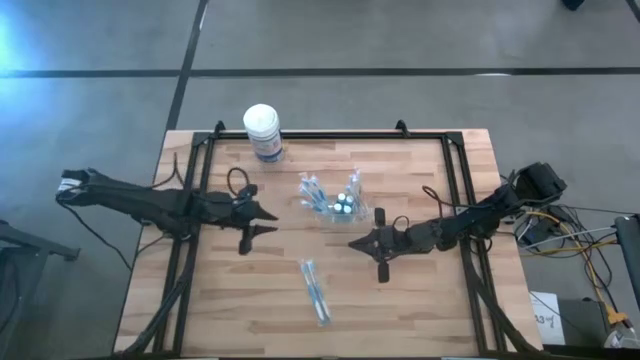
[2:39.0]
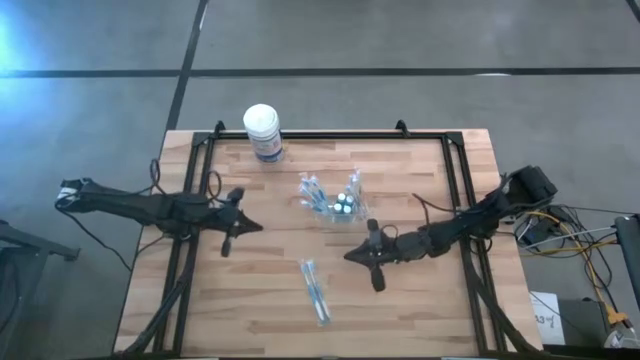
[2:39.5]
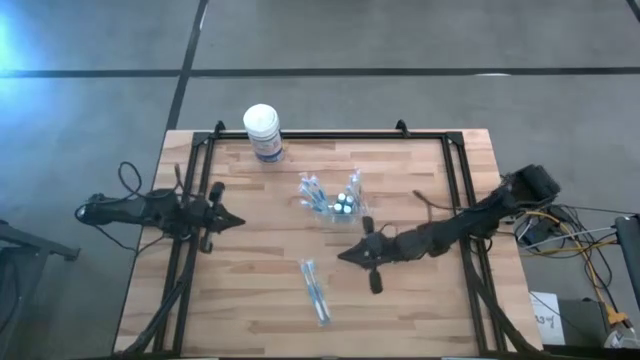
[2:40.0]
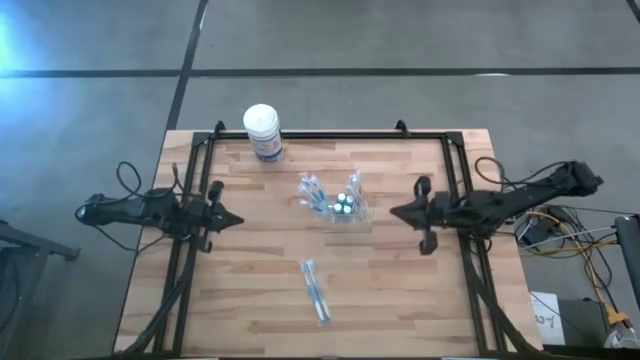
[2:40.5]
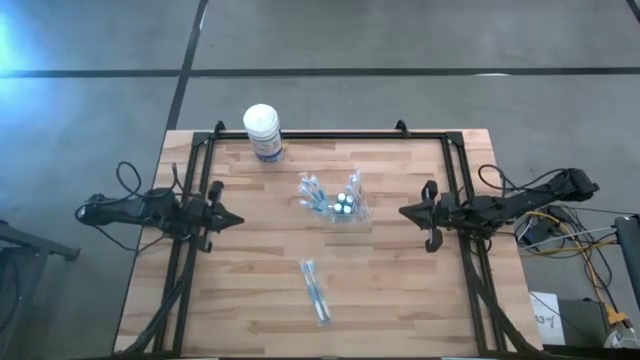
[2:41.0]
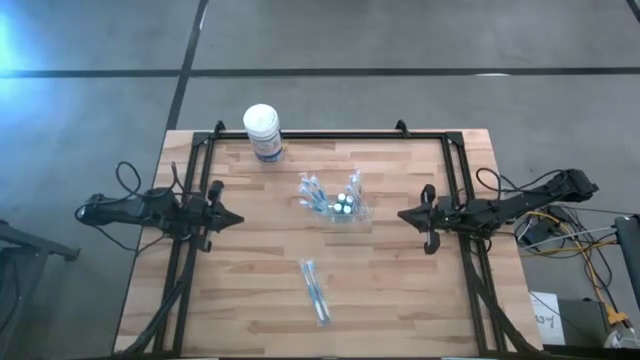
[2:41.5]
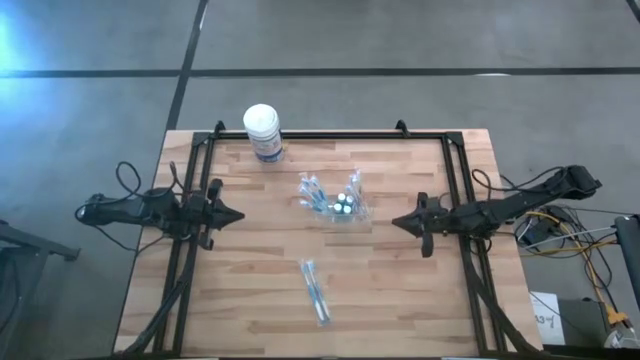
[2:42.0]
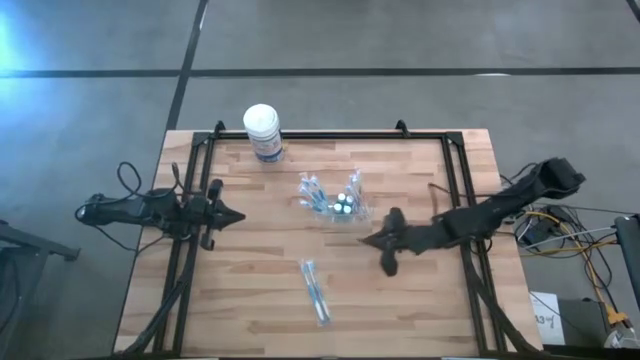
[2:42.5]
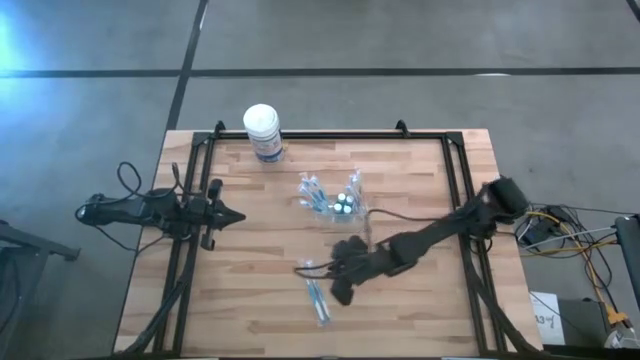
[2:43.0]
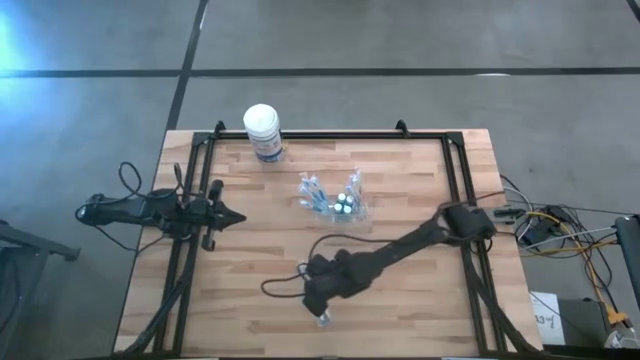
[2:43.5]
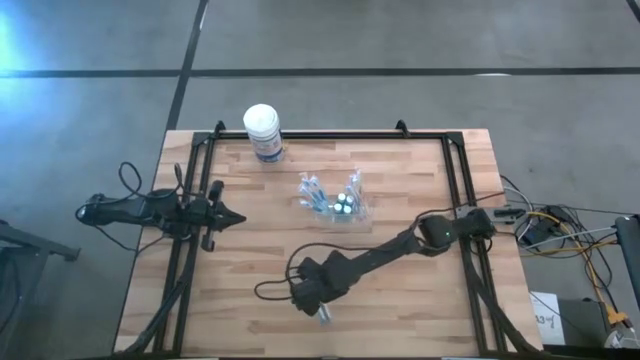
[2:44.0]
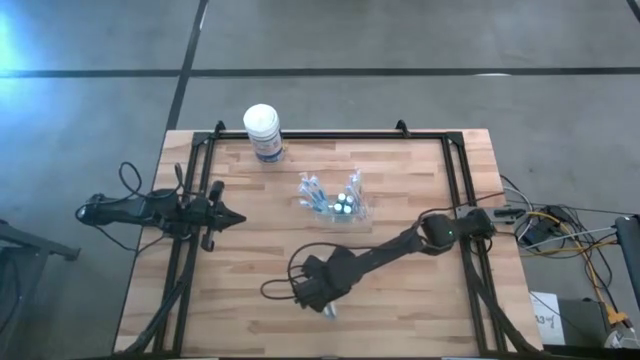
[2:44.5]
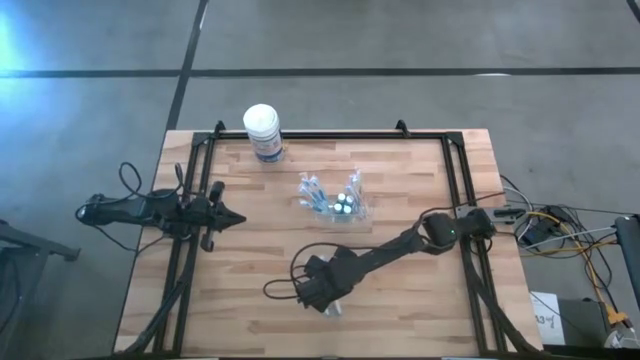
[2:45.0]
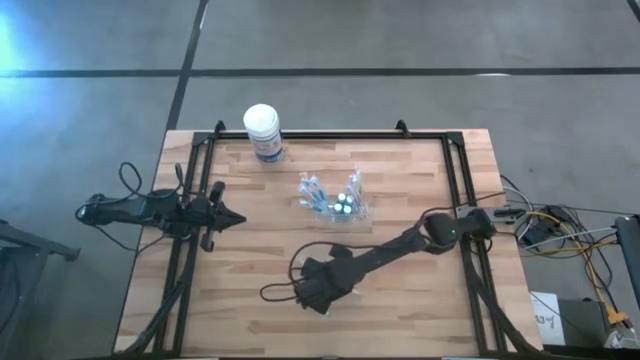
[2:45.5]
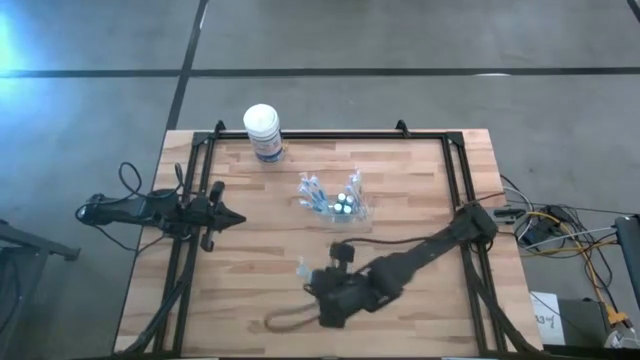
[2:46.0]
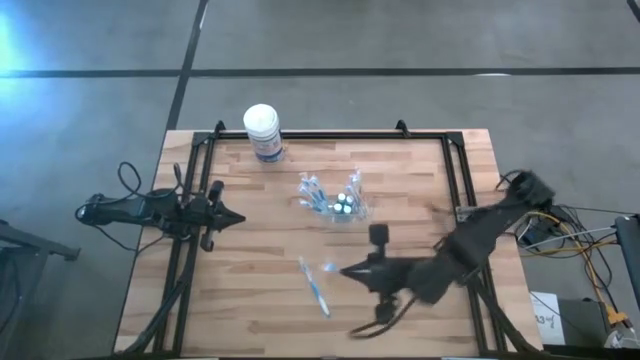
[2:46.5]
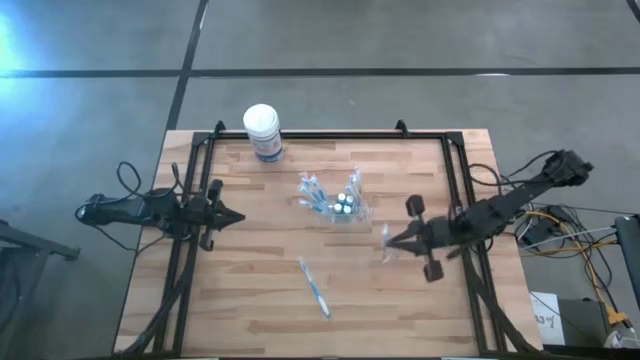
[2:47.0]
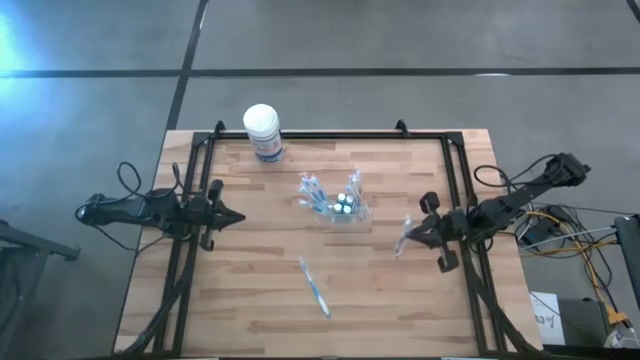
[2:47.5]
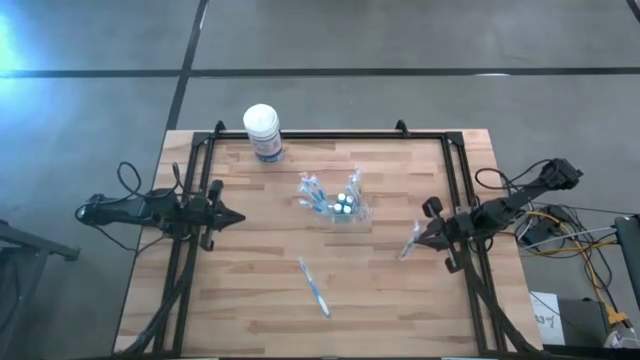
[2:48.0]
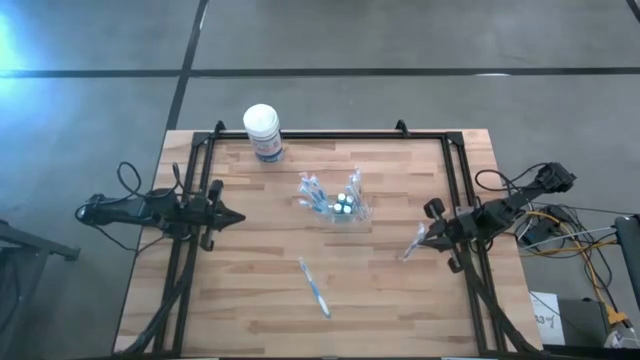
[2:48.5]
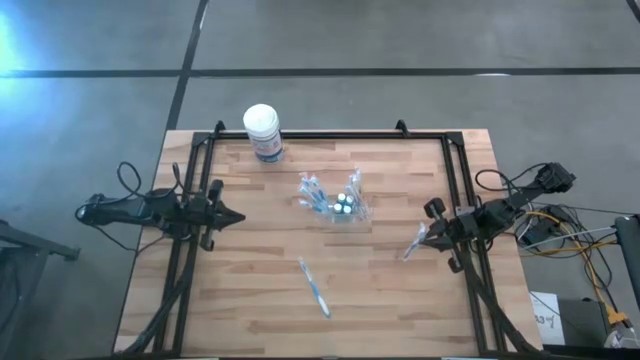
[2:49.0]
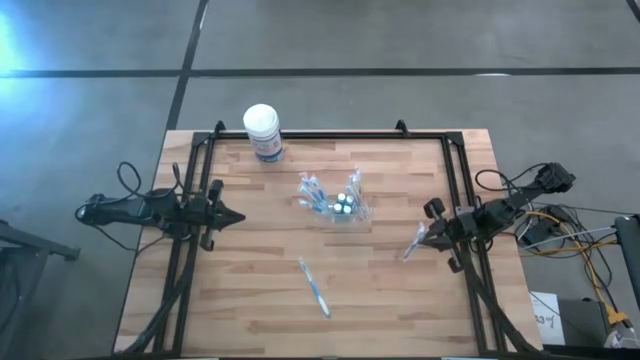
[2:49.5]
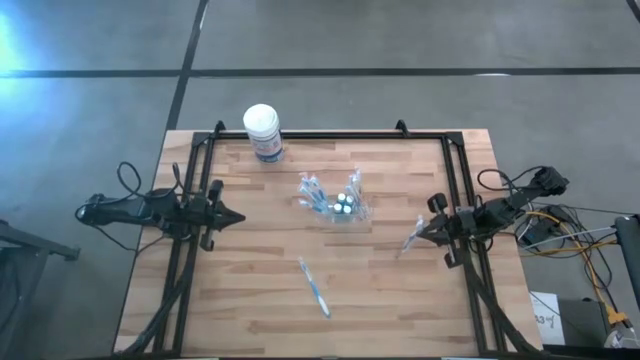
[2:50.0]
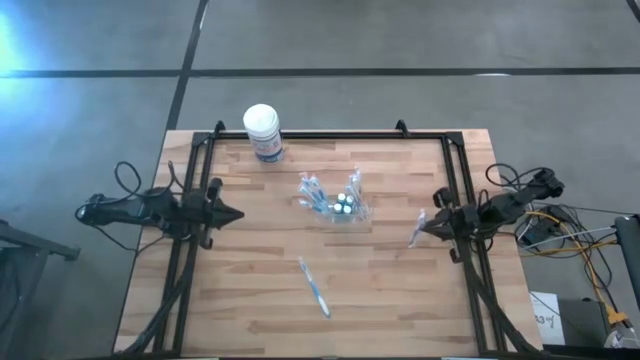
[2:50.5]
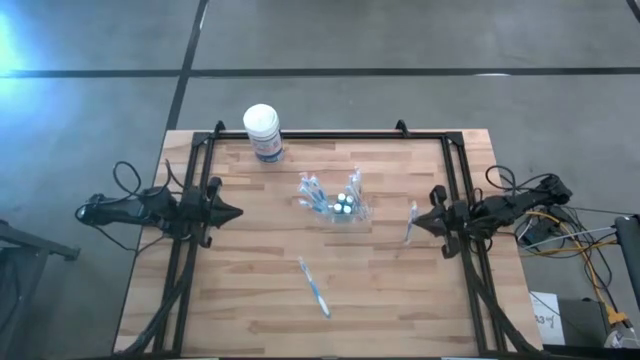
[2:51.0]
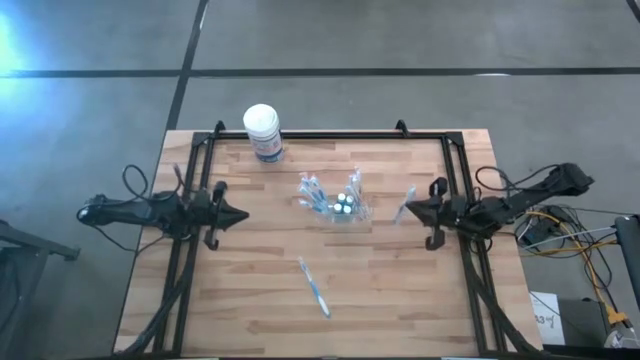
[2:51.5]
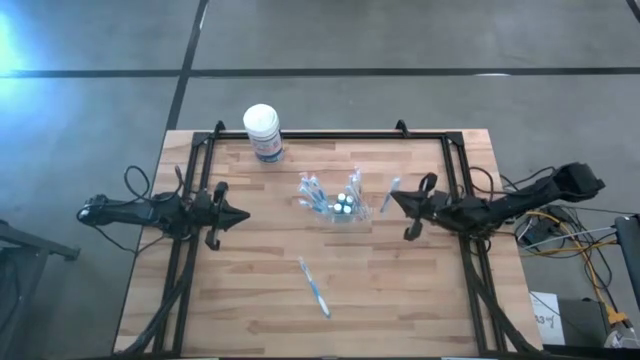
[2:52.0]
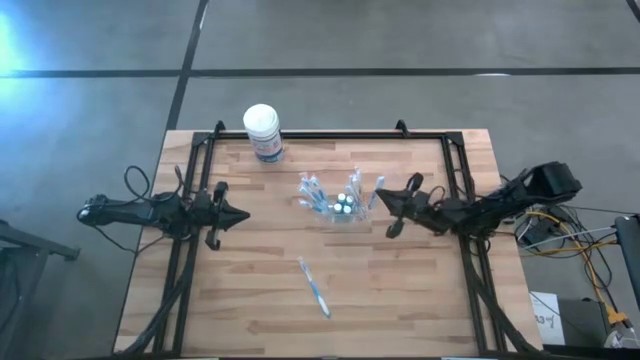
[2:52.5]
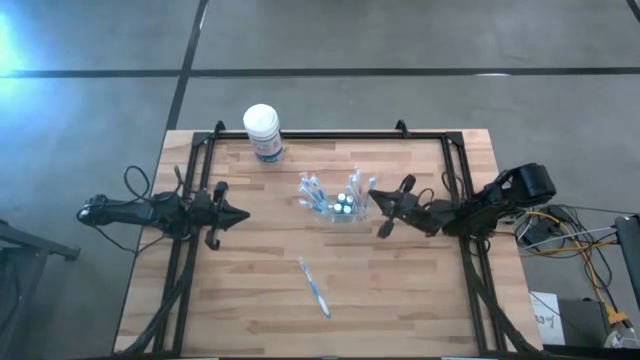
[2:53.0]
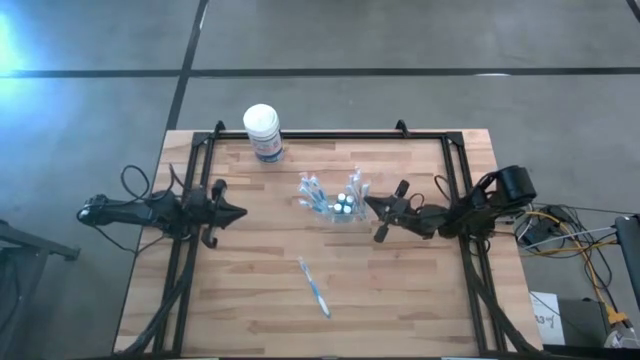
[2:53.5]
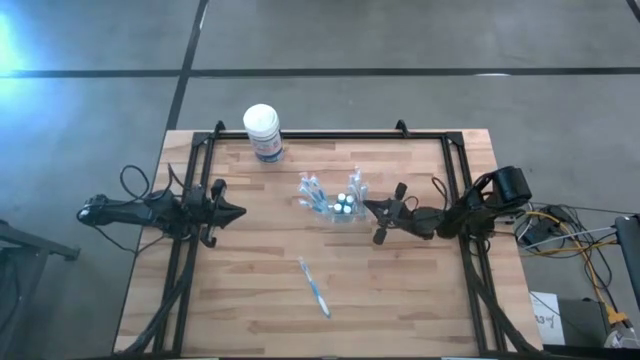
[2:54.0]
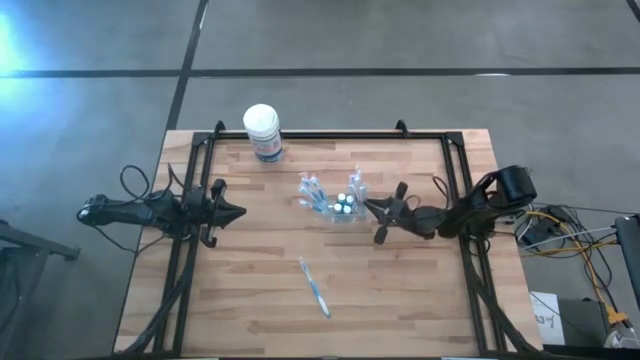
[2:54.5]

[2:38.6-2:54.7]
Task: Pick & Place toothbrushing station
Put the blue toothbrush into the transparent organizer

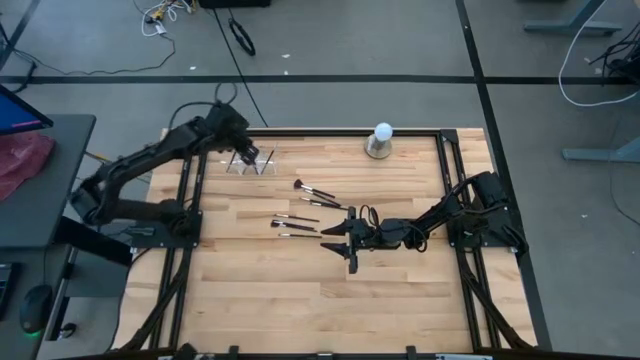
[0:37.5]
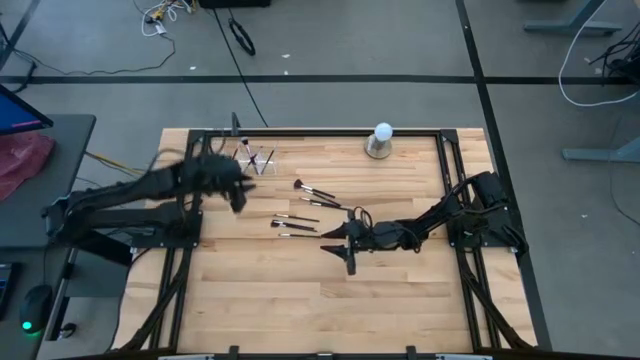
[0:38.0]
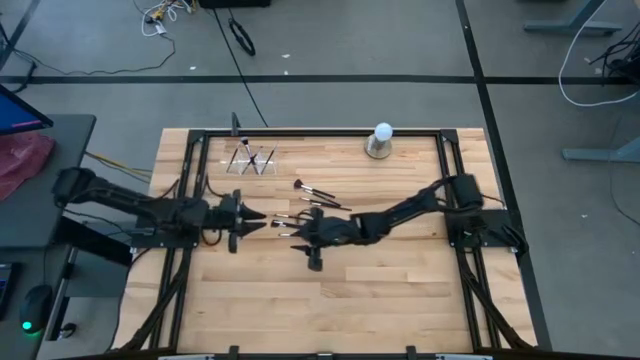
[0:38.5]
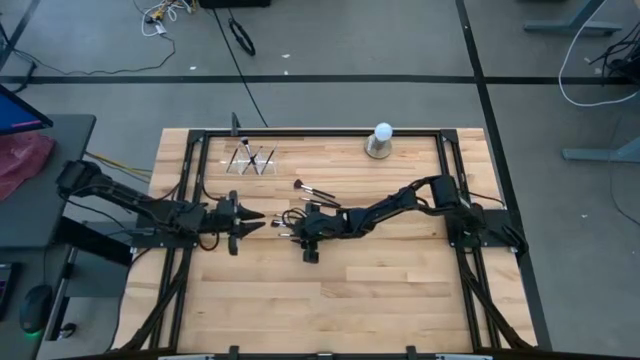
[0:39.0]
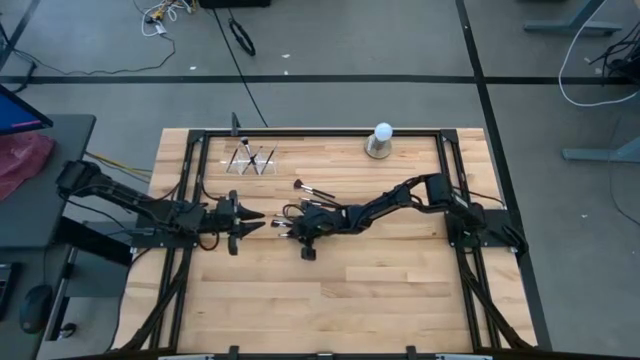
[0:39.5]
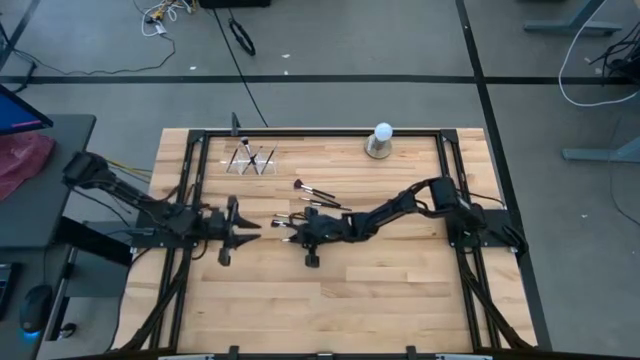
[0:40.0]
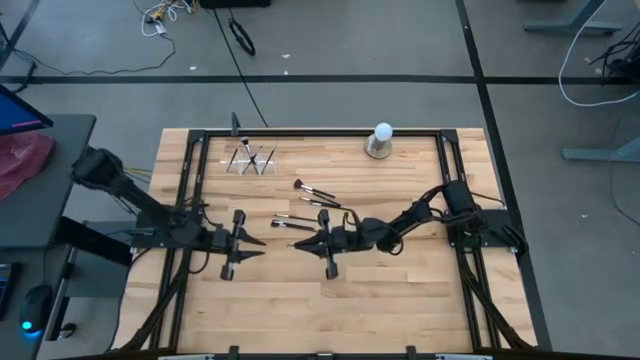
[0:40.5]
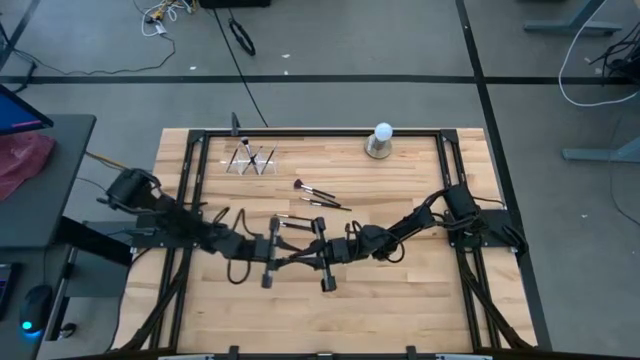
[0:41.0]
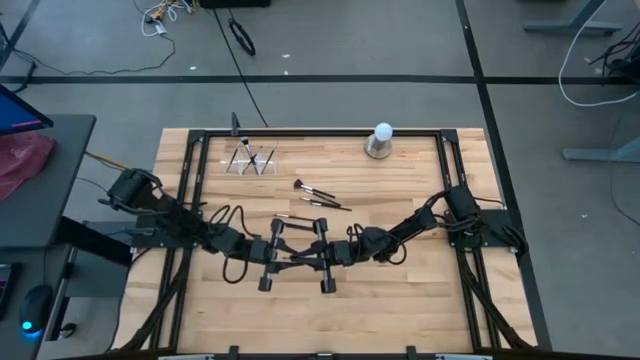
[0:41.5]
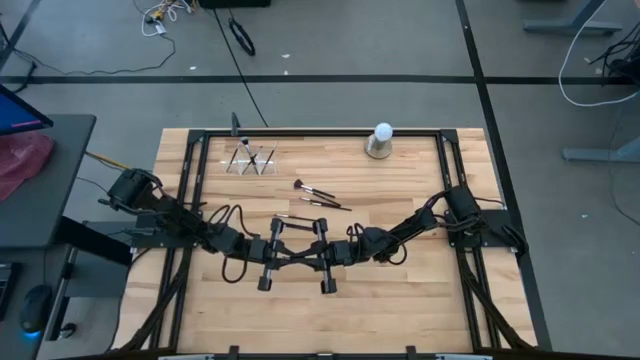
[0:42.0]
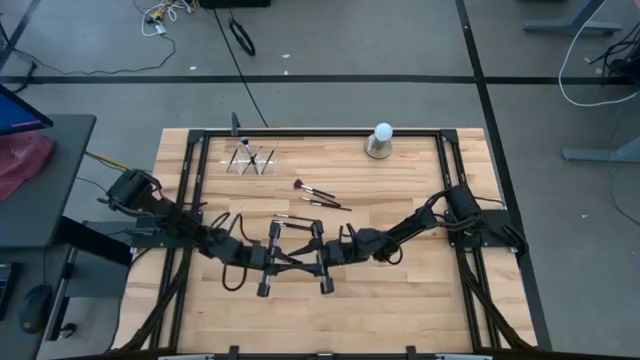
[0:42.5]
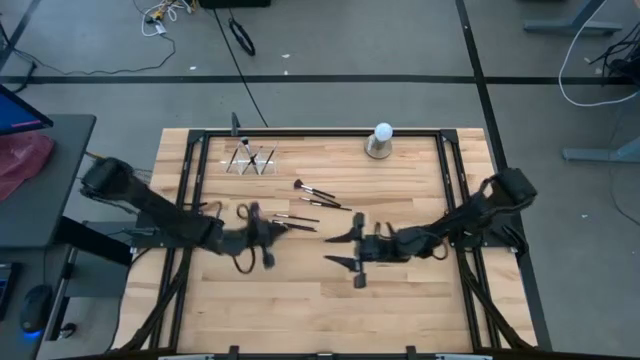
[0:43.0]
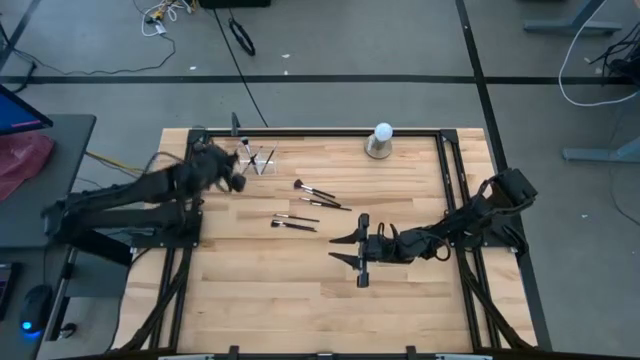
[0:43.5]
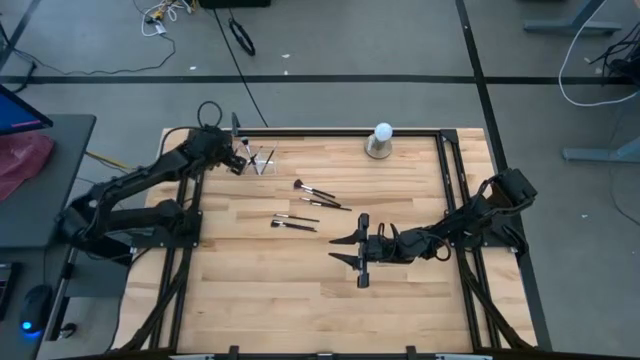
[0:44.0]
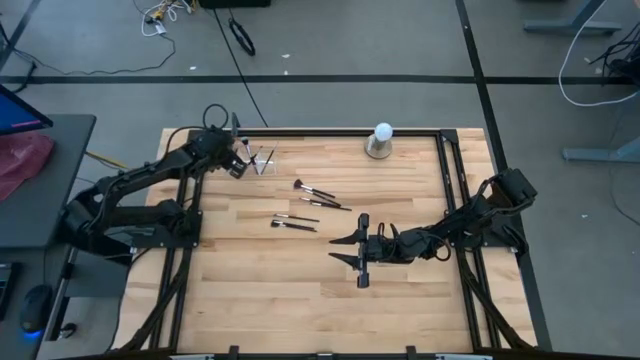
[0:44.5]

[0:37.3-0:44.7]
Task: Put items in baskets/containers
Put the eyeshadow brush into the transparent organizer
